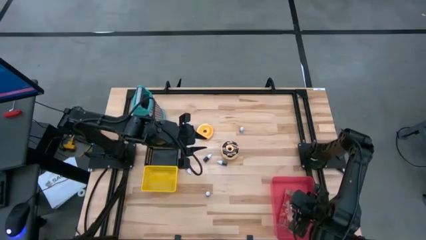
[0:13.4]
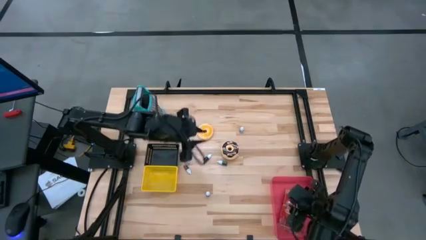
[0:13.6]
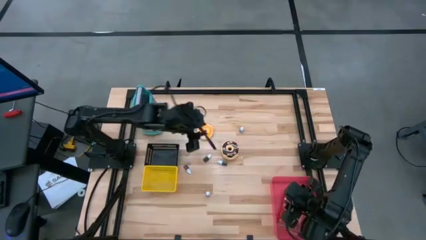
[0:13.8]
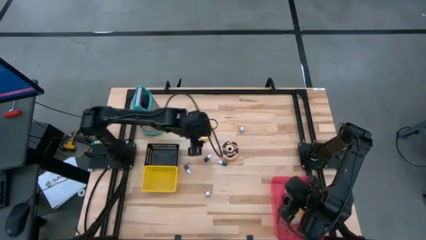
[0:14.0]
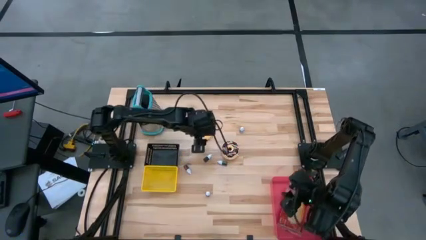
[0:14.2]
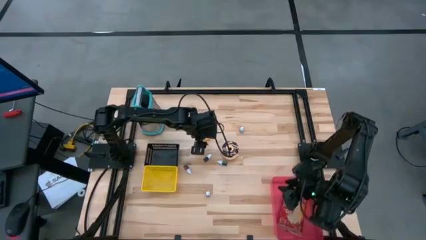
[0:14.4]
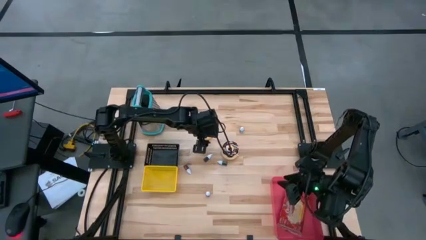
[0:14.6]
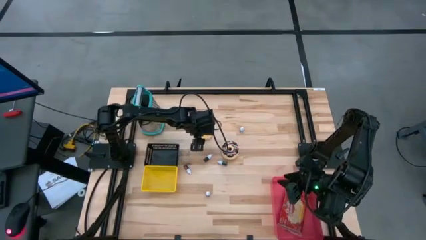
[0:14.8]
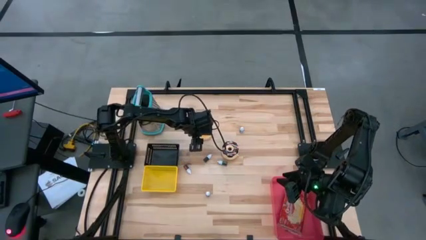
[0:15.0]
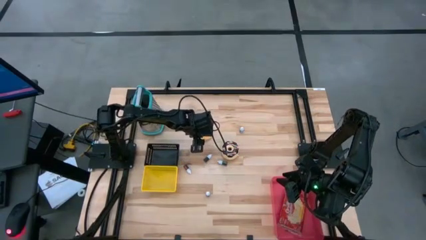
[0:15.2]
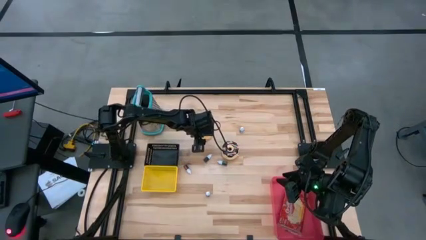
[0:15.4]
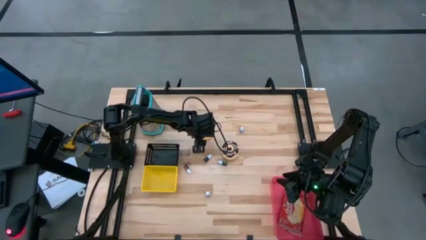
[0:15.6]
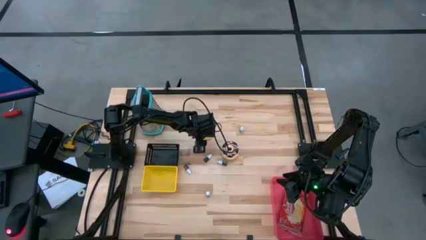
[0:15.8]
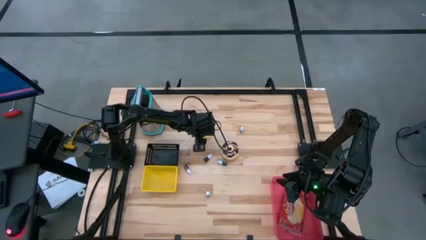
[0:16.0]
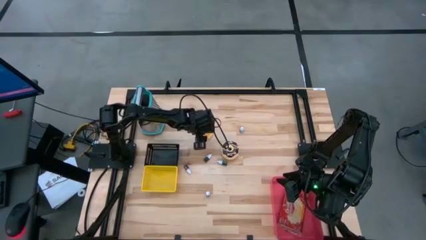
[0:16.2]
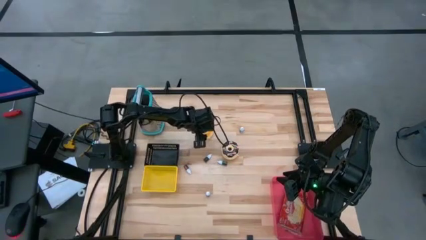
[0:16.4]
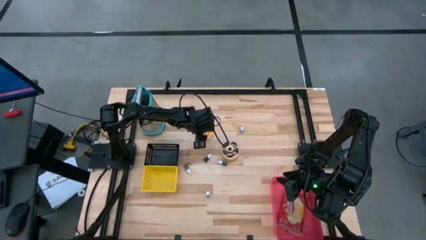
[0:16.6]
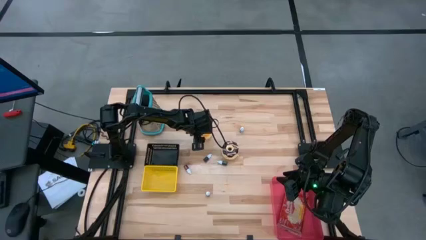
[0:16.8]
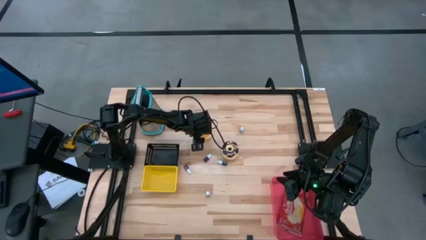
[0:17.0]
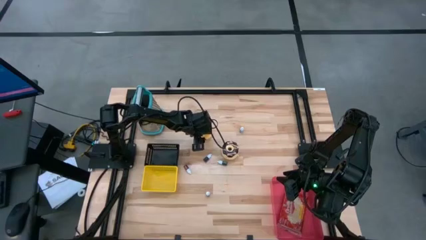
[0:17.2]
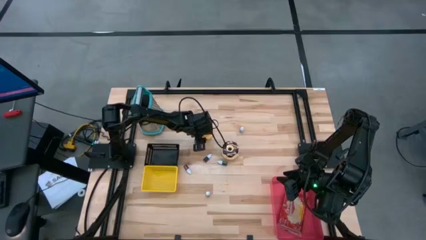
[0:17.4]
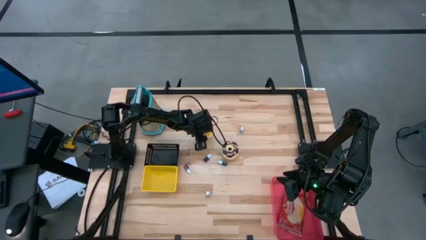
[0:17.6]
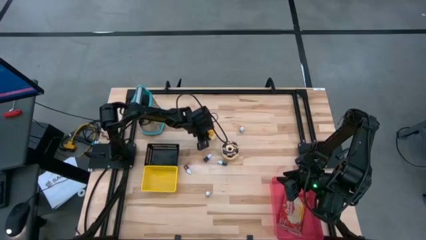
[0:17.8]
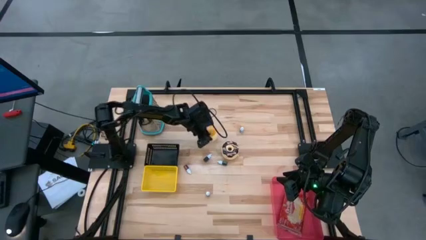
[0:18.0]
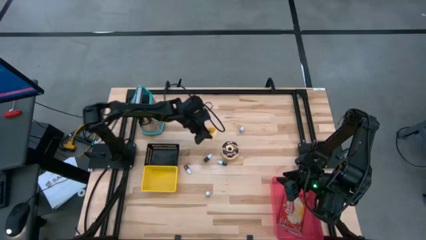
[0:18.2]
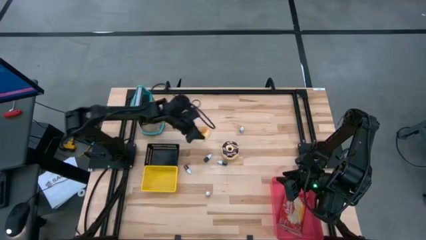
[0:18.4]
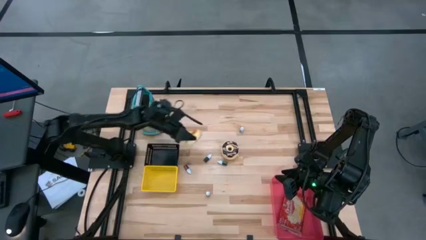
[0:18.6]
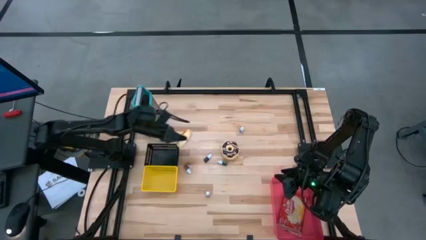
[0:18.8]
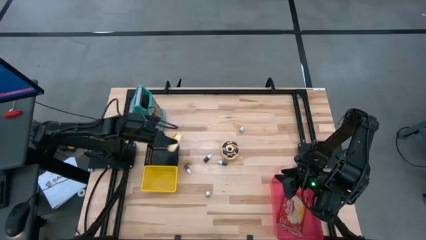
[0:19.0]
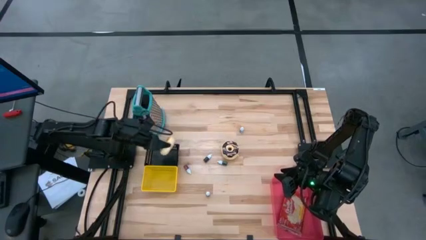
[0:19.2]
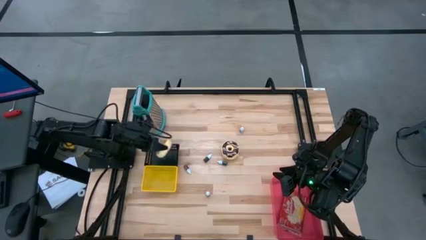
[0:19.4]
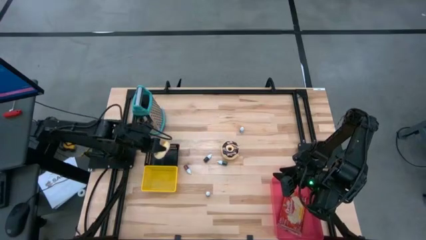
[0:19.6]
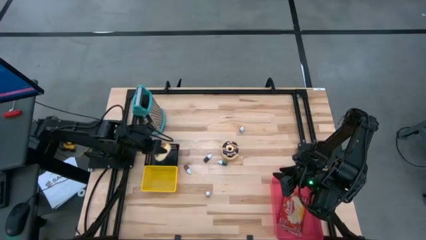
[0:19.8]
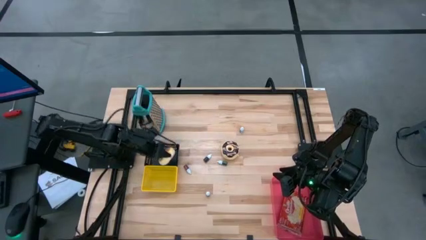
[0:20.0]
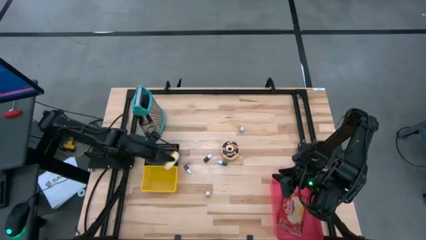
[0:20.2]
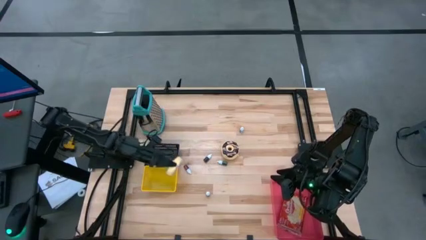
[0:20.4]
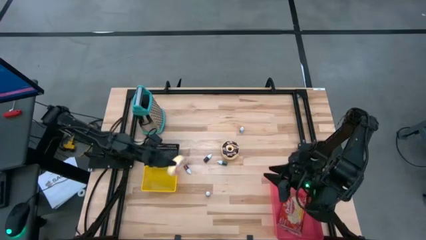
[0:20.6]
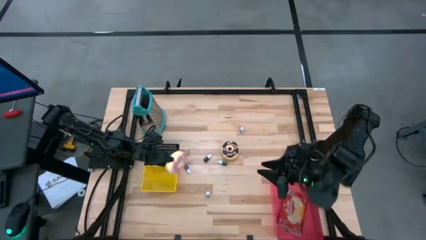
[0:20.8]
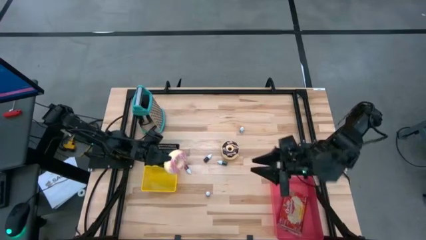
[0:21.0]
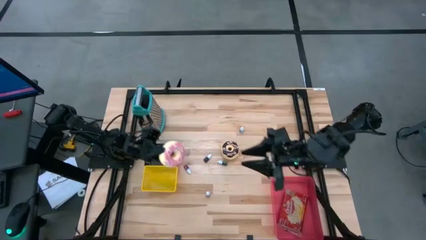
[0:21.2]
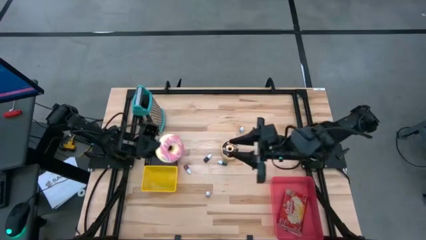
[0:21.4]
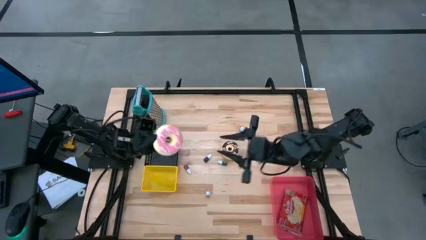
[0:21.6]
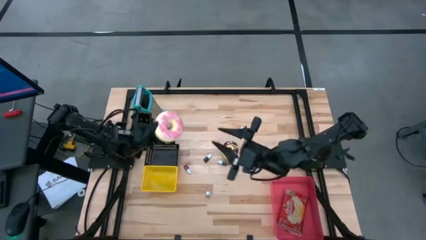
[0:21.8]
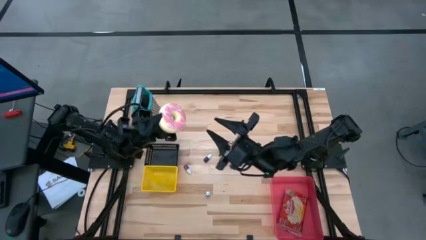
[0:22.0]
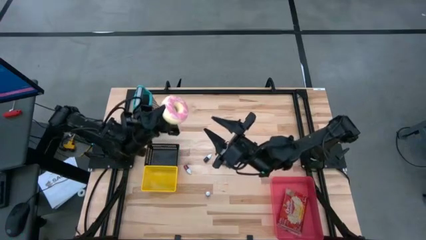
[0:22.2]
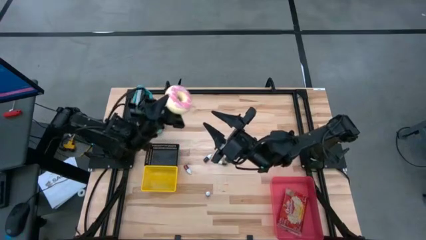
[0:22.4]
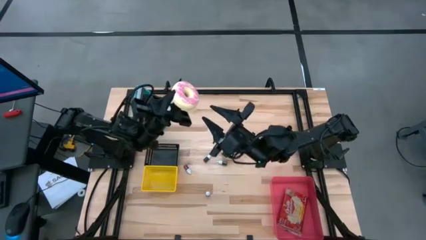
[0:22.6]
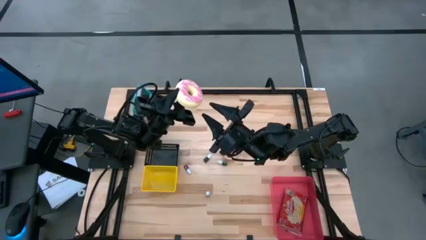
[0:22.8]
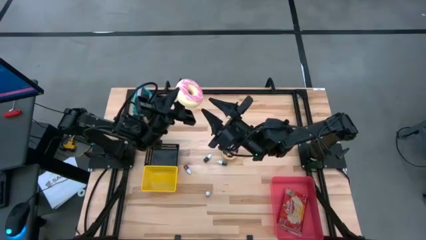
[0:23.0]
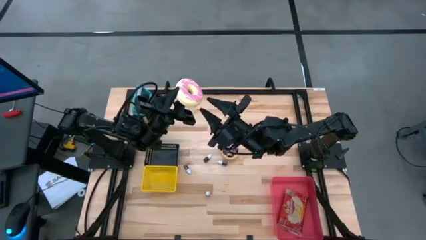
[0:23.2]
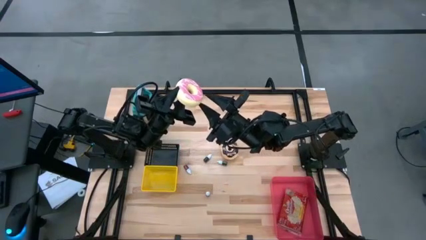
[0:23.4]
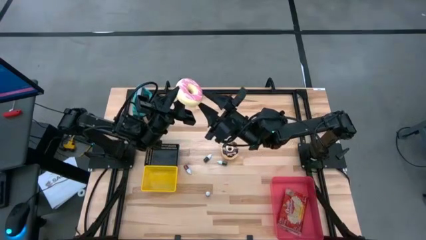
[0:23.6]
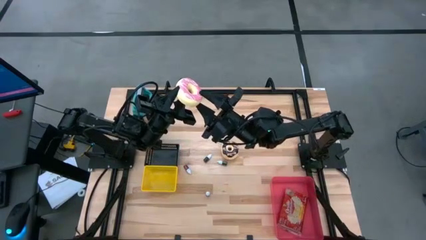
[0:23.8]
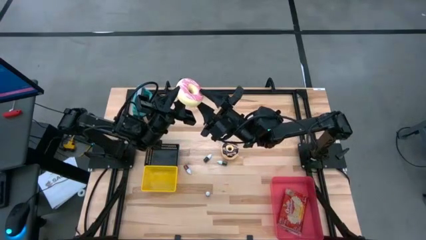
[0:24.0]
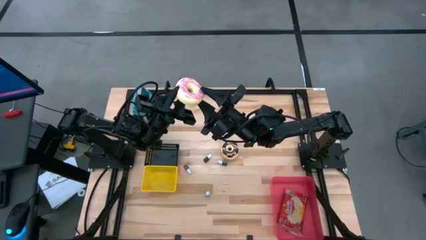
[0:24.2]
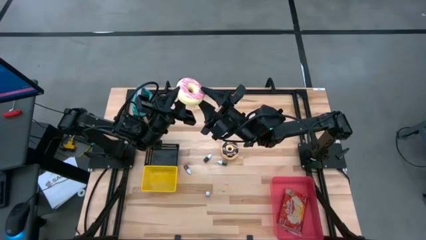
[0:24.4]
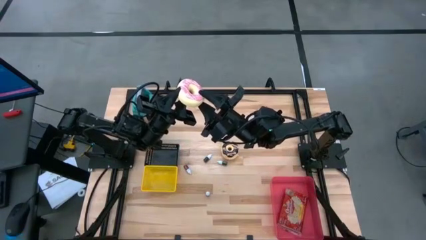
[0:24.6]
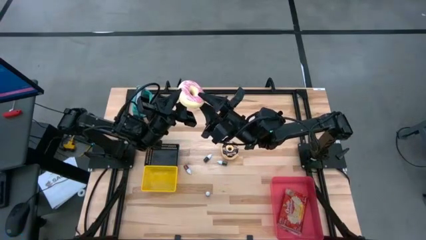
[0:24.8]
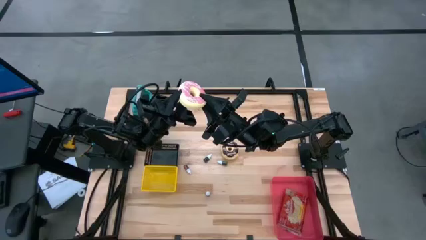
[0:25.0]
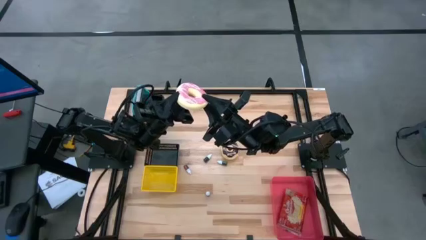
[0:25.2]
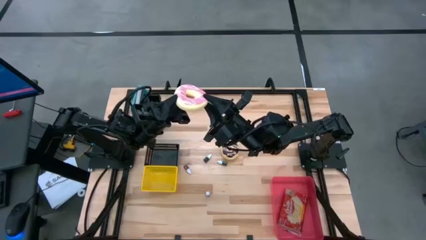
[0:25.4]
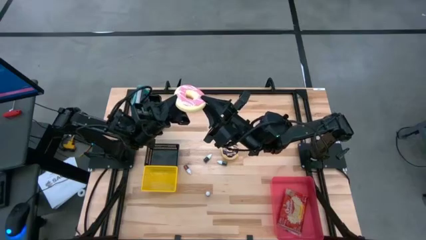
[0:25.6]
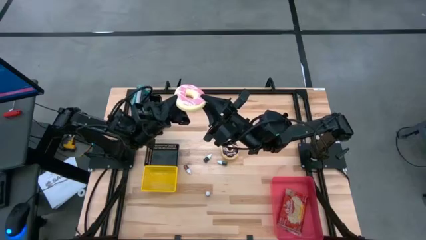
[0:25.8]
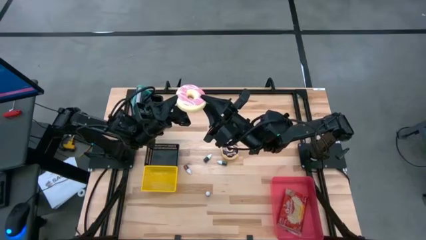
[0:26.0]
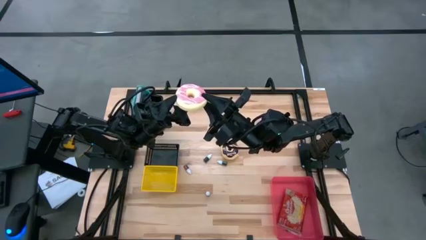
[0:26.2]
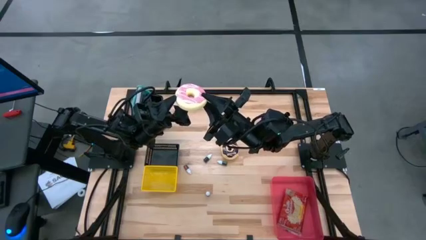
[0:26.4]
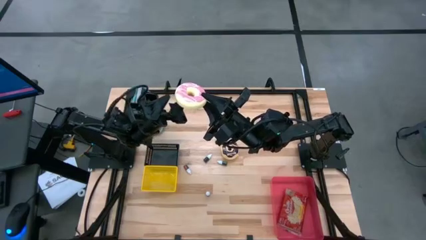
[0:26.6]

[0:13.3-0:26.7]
Put the pink donut into the black bin
